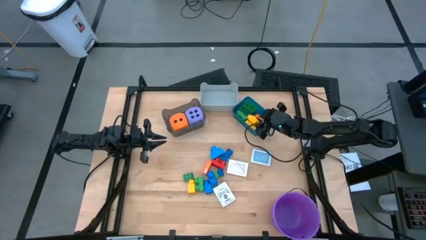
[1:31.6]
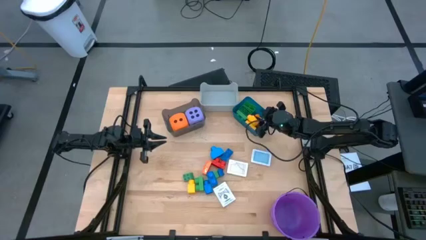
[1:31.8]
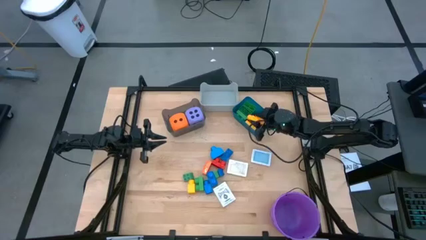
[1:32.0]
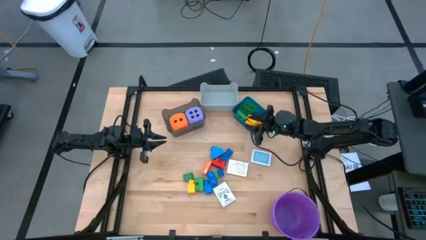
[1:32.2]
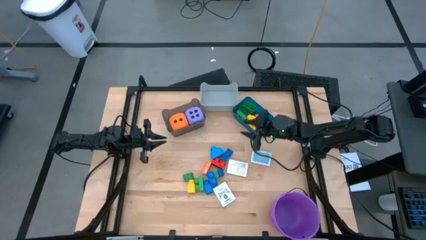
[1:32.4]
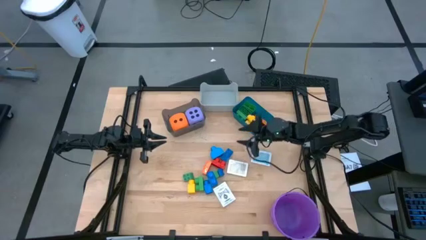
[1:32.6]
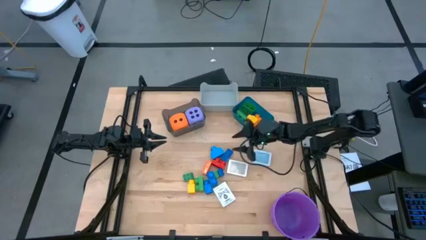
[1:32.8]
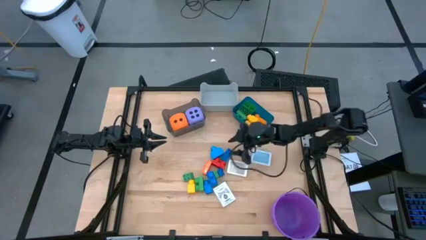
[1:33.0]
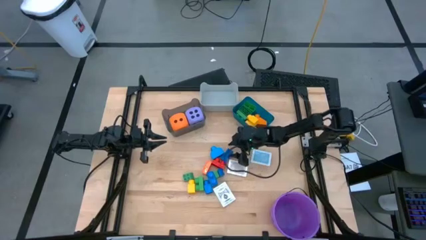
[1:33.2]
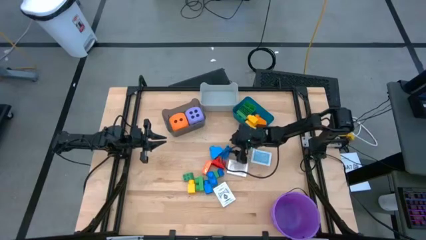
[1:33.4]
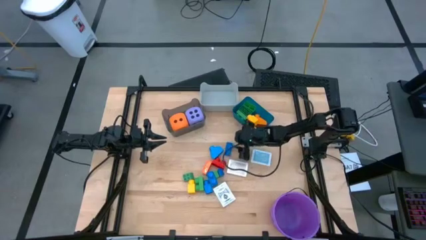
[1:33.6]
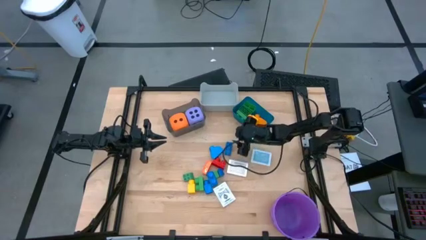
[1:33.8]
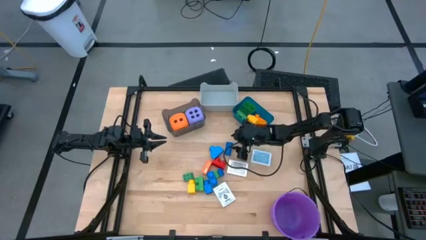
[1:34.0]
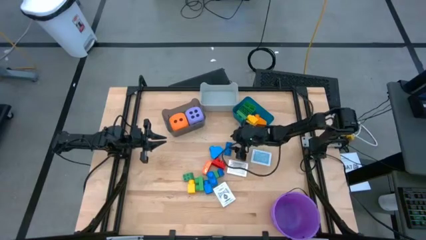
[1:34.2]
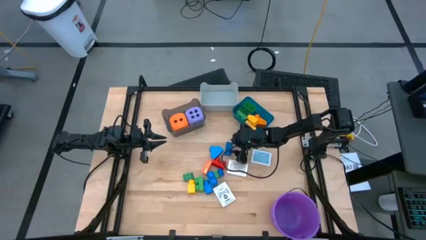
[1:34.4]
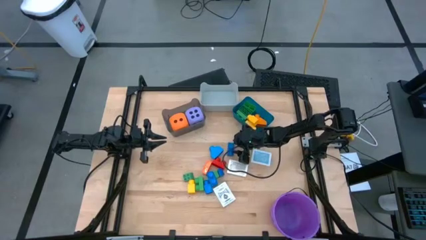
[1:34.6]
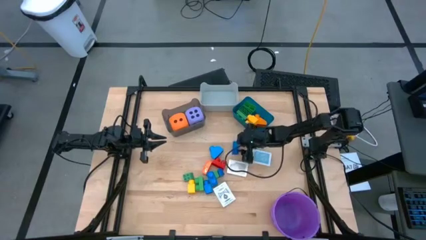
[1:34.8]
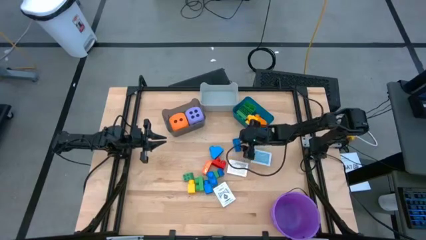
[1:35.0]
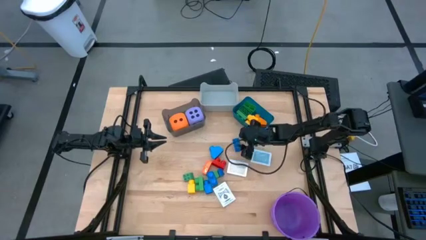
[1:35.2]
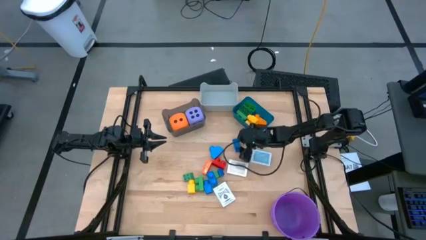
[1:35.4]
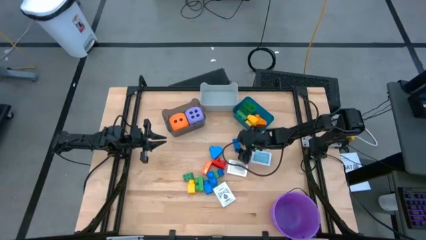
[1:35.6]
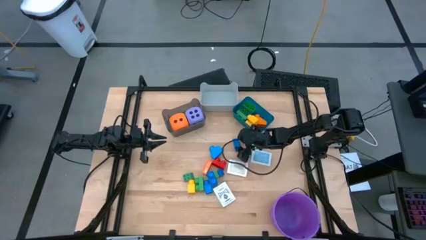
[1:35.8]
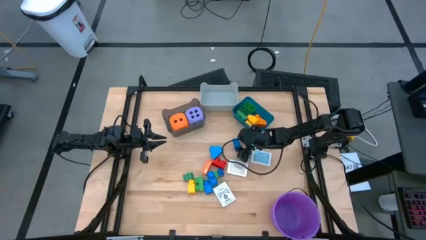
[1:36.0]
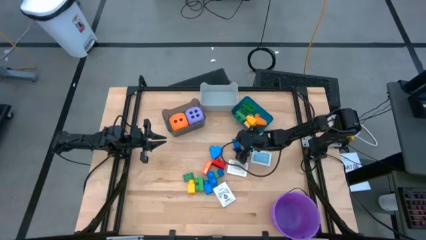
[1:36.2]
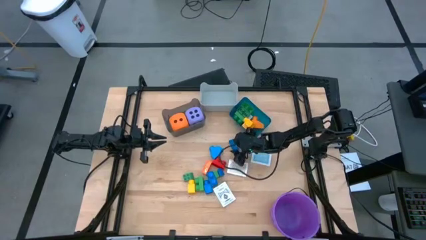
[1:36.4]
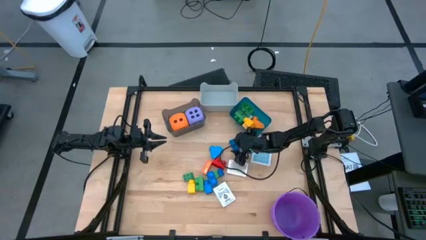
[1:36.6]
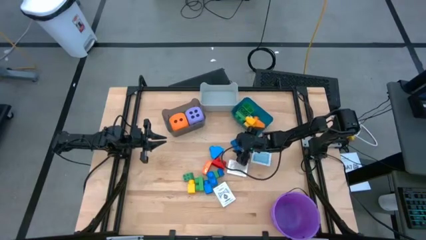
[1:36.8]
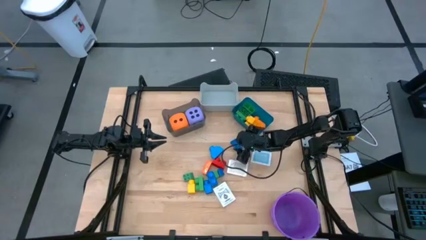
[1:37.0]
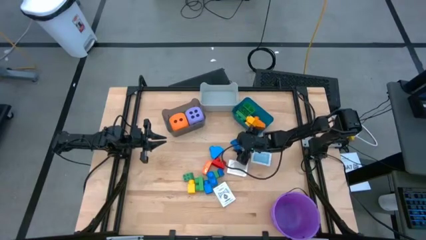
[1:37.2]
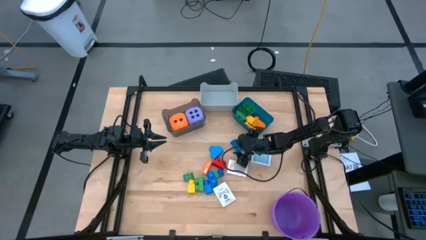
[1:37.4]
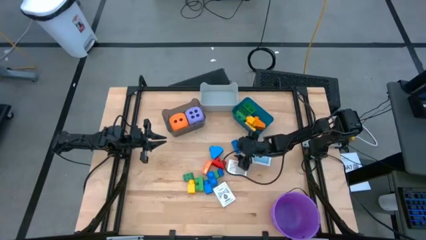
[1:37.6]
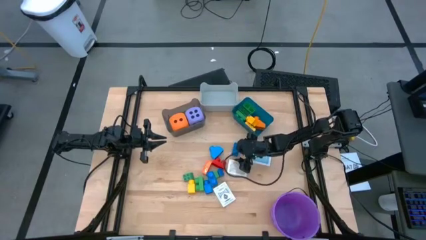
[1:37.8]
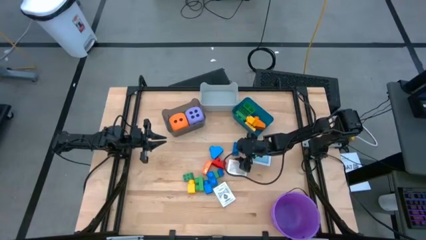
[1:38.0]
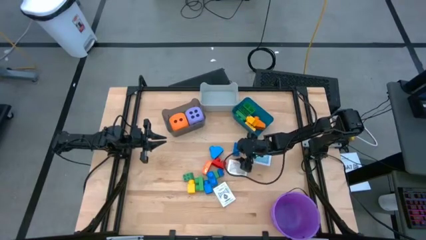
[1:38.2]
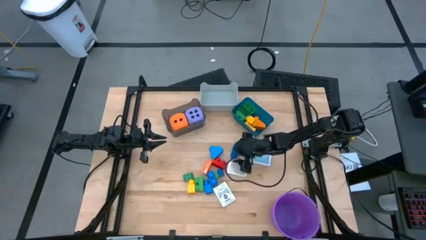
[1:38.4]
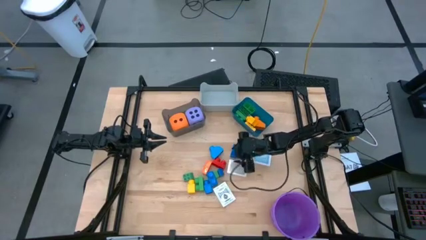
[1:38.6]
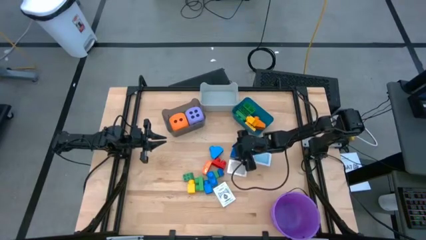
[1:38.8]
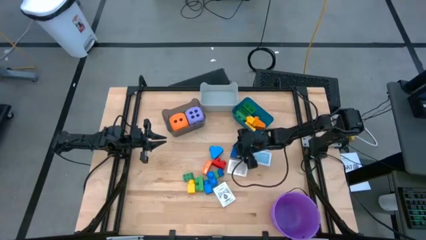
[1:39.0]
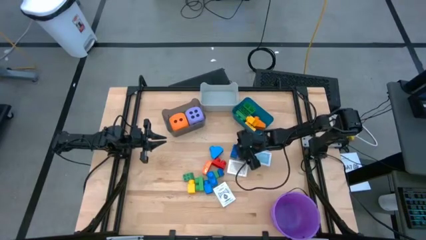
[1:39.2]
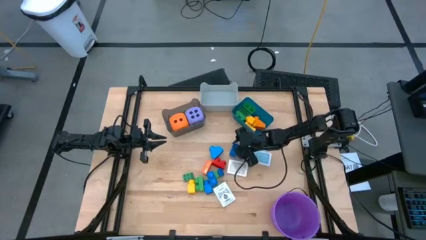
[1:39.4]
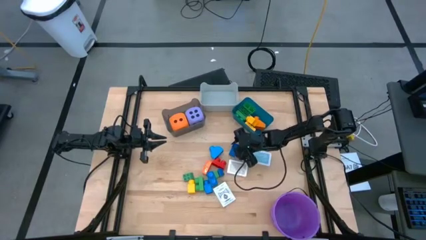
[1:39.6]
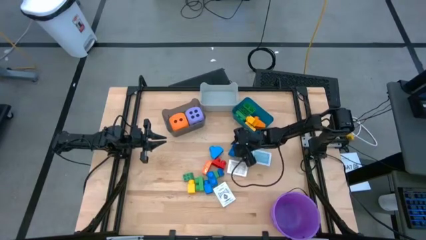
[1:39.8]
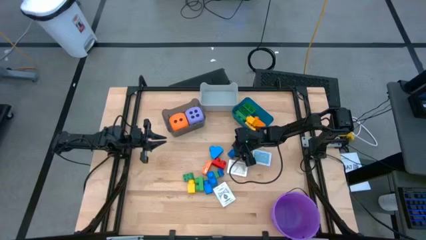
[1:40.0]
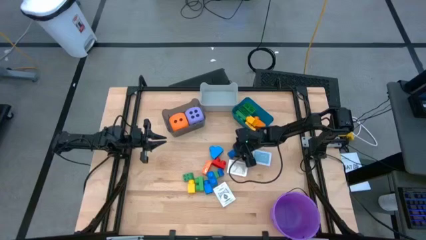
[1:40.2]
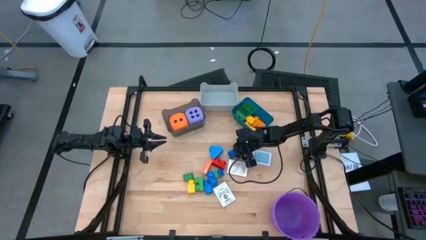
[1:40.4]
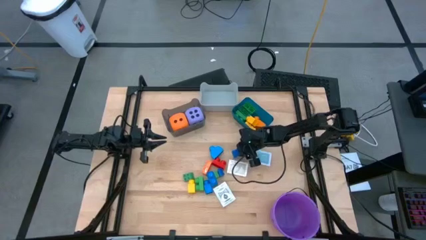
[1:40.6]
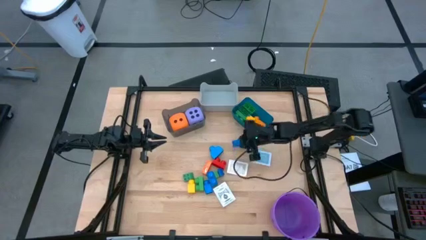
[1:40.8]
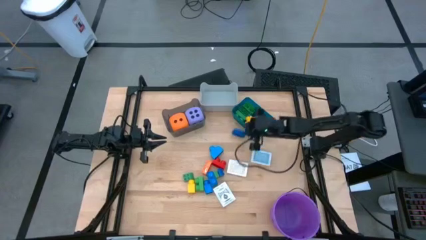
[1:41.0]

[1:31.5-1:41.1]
Task: Pick & Place Toys
Put the blue 8 studs game piece into the blue bin

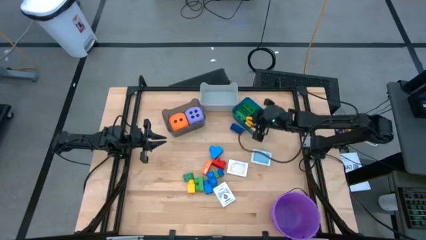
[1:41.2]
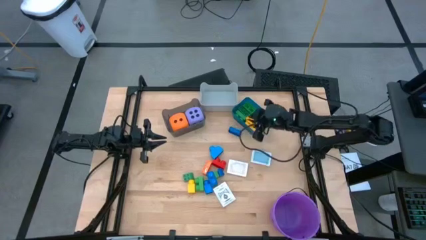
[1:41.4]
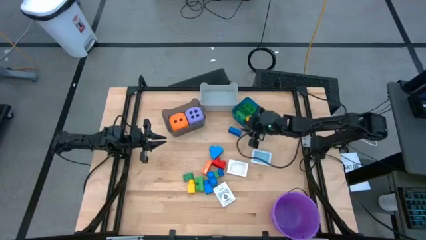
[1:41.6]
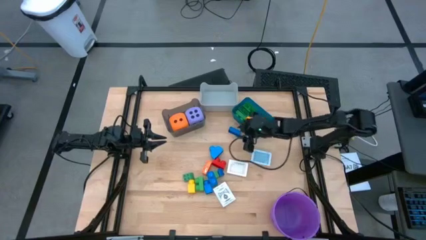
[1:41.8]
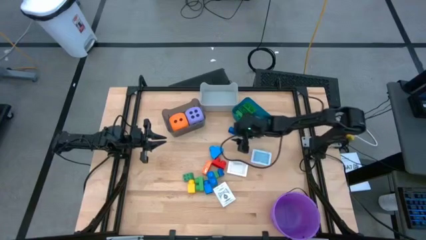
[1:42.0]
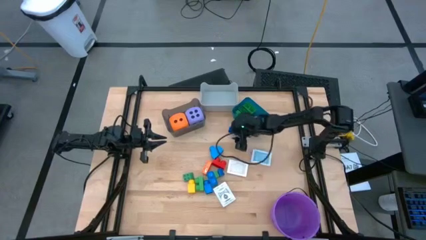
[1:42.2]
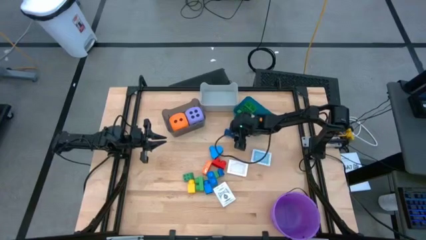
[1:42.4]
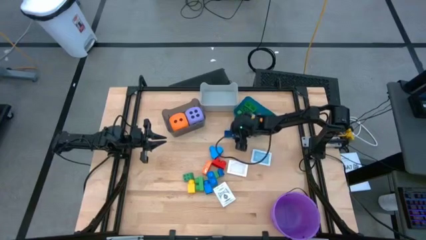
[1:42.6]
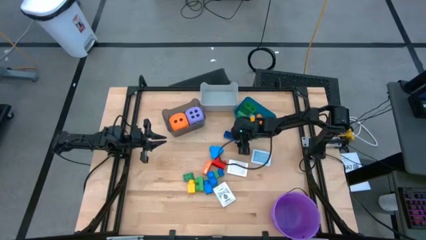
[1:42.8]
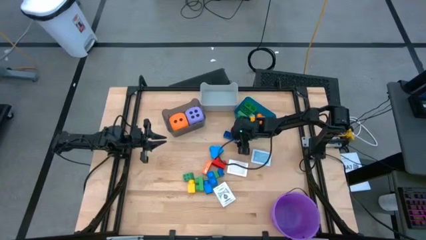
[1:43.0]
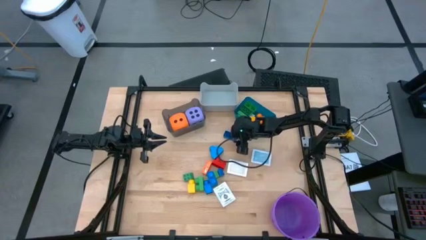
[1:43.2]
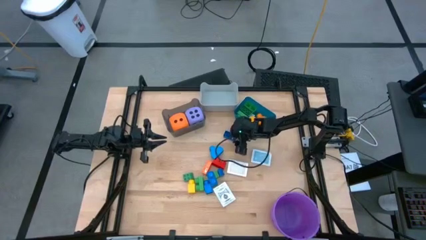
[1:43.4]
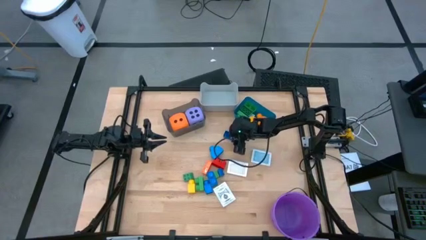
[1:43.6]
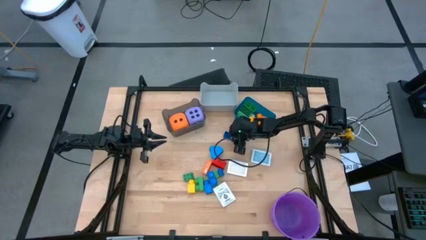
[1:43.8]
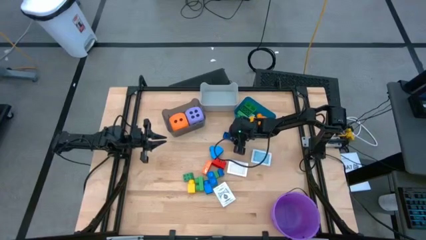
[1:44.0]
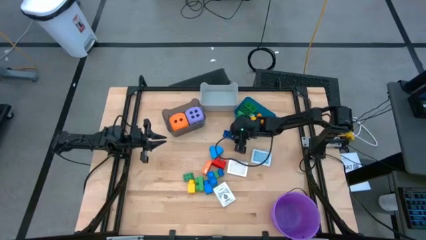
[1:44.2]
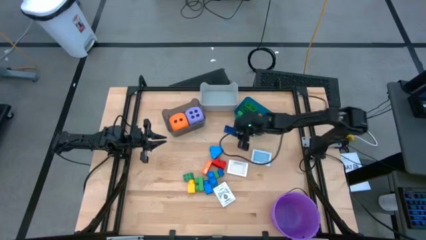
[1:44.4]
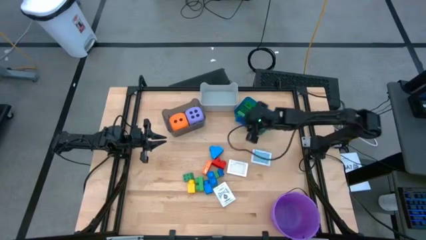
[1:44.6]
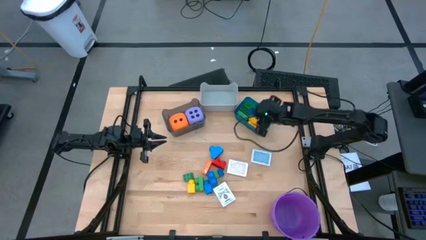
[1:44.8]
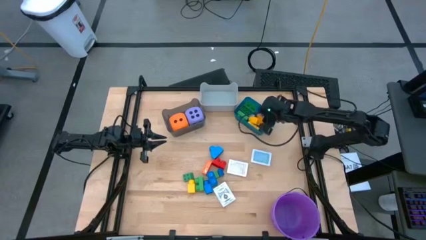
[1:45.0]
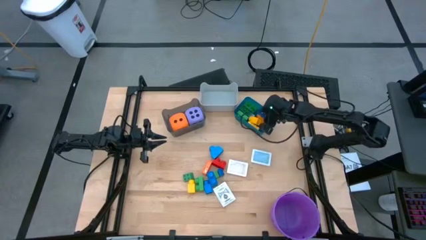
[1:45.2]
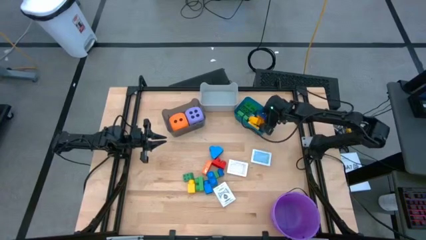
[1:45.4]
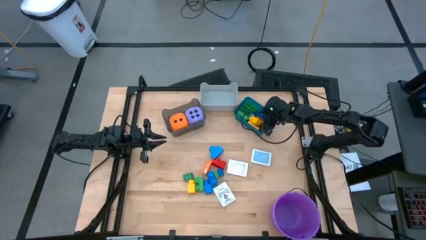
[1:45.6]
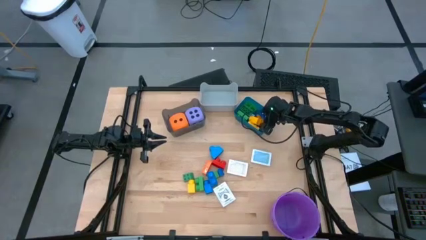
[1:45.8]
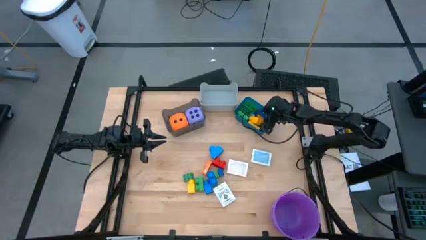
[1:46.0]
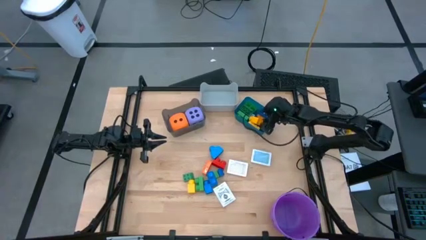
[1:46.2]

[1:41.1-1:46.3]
Put the blue 8 studs game piece into the blue bin

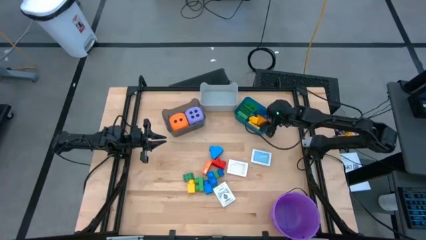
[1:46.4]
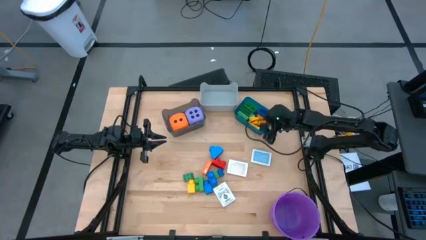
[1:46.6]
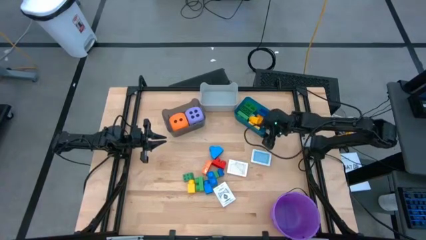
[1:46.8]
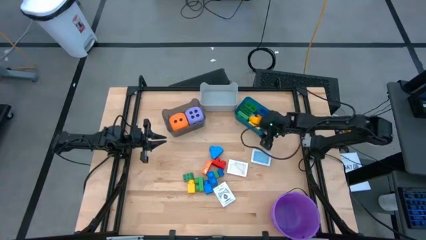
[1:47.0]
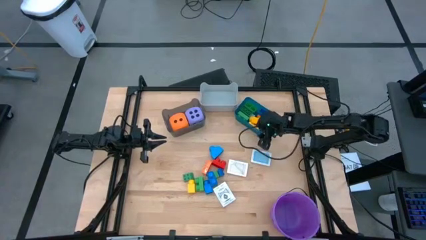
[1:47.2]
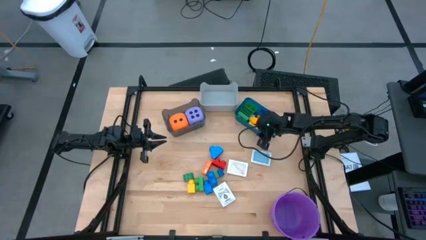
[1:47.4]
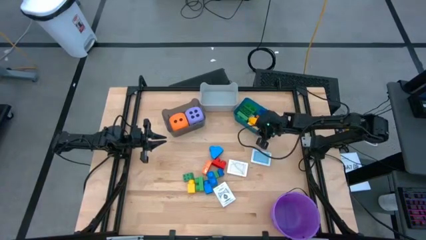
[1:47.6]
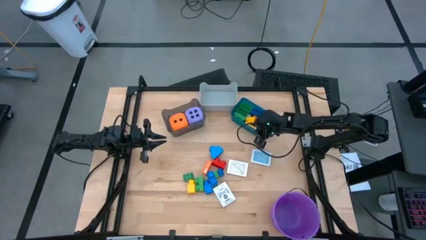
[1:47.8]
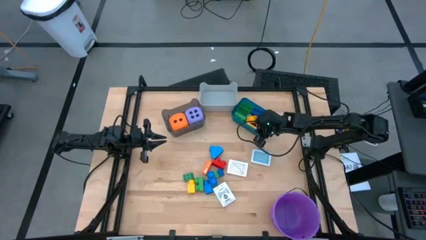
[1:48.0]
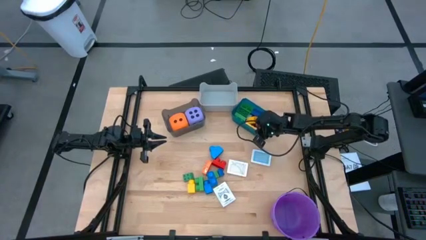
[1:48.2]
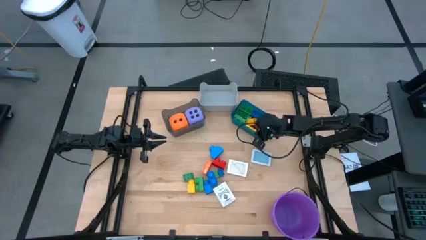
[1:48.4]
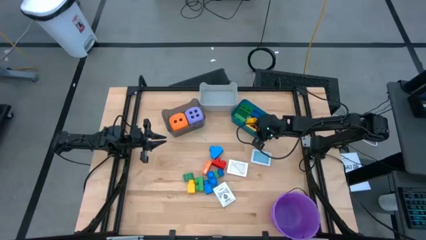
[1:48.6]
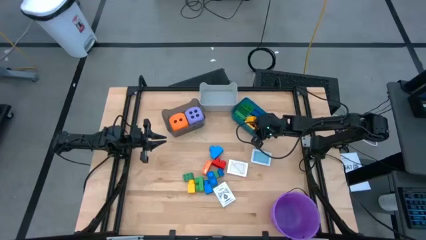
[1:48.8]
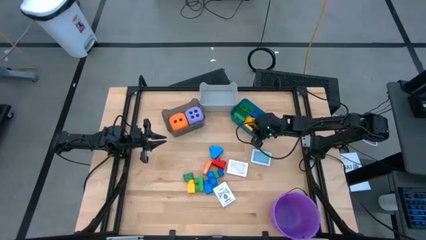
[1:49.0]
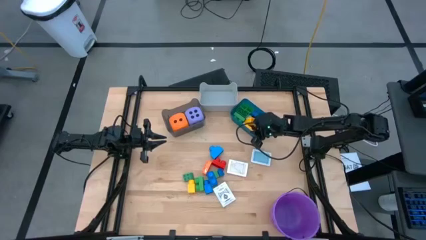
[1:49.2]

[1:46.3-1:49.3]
Adjust the blue bin
